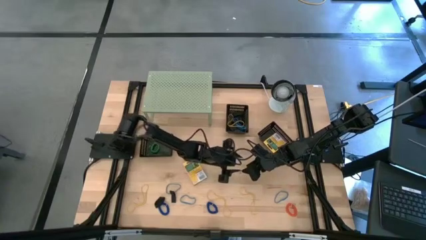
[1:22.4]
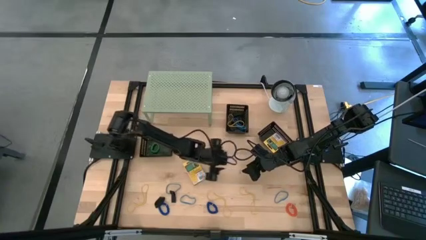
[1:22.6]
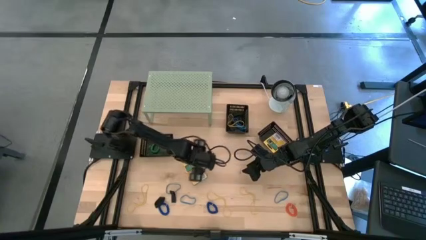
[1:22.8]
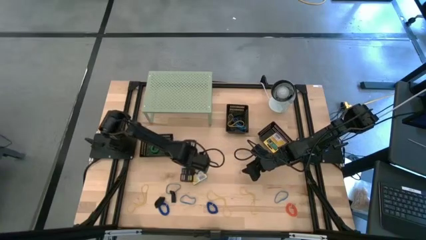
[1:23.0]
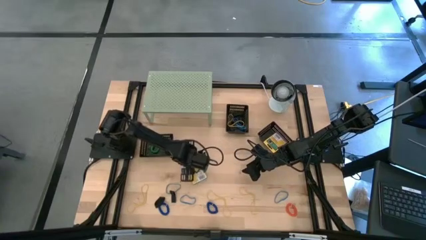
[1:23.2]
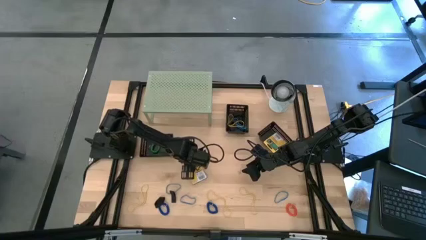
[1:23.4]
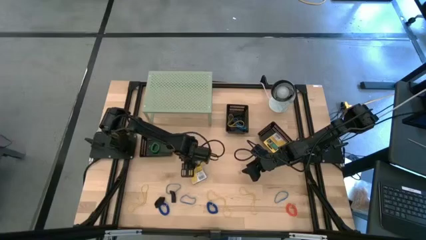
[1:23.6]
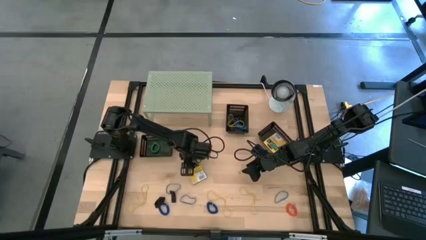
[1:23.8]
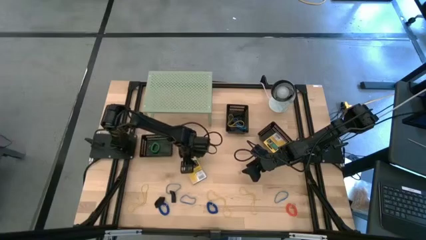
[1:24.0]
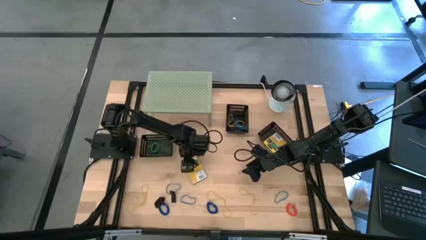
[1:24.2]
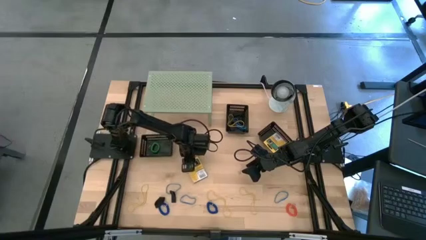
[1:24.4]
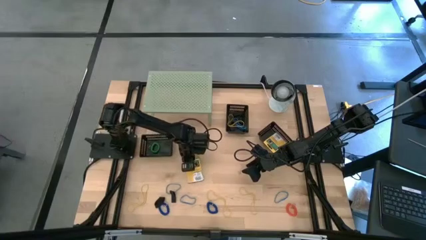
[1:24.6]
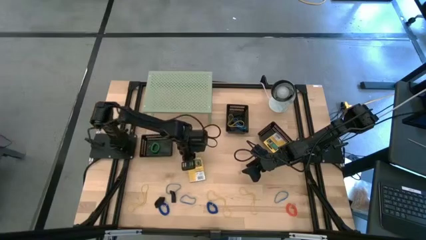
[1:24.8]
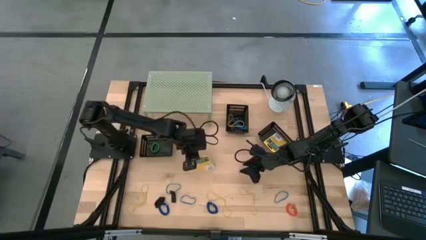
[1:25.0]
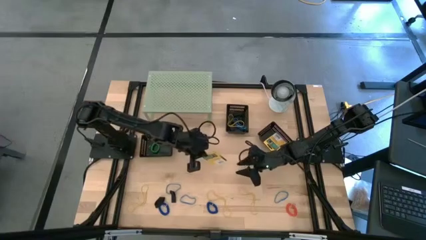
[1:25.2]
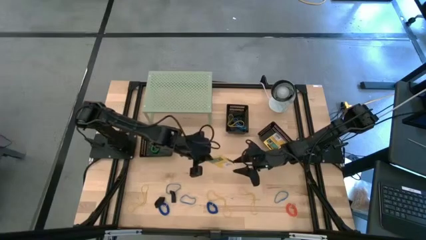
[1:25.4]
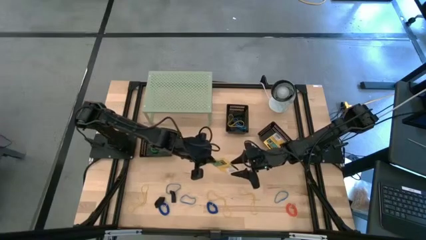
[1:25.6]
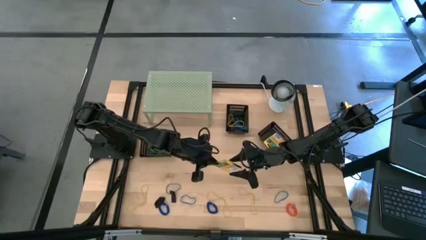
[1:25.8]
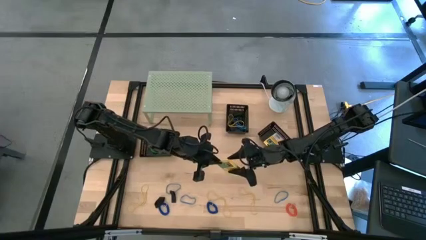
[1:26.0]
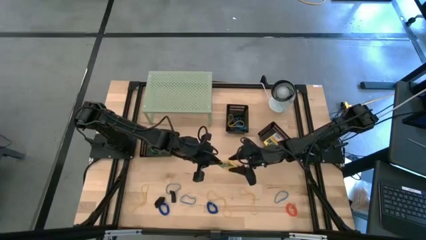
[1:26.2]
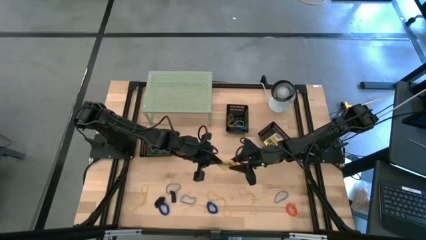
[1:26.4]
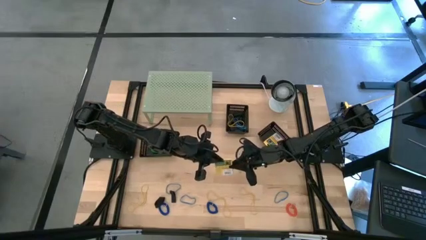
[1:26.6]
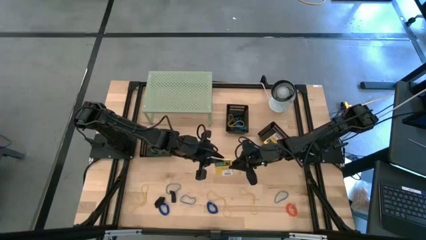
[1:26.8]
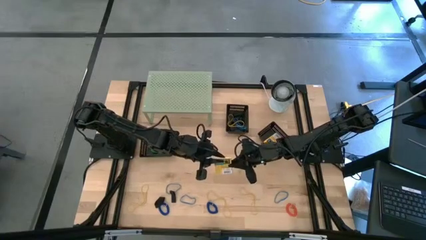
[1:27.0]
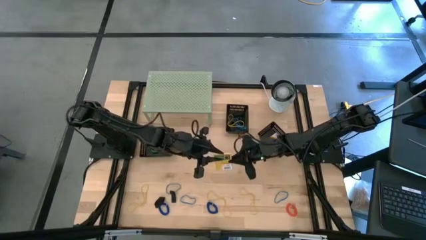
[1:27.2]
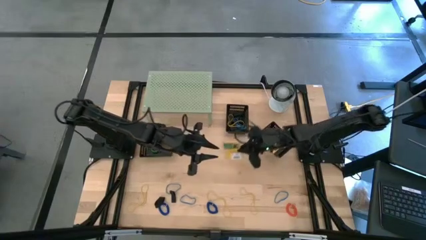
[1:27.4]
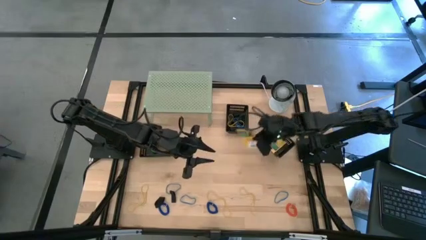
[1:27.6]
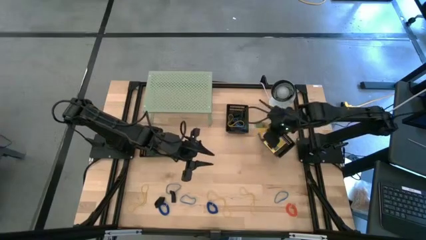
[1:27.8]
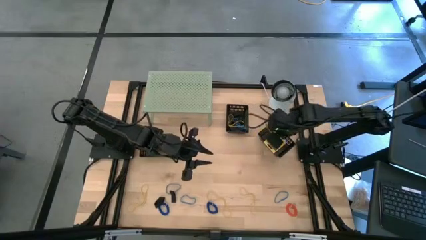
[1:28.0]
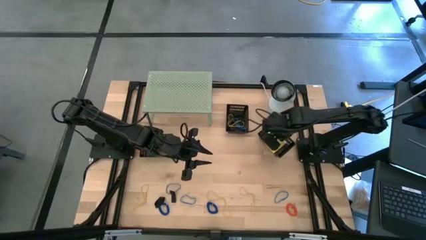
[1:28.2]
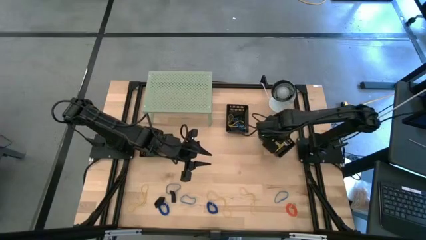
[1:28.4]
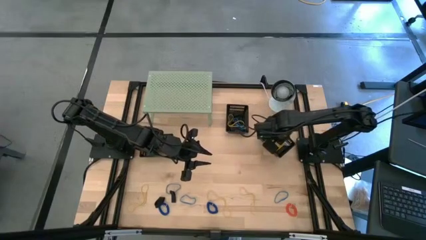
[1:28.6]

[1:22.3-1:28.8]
Task: Pick & Place Office Desk Supplies
Put the yellow crayon box into the right black bin

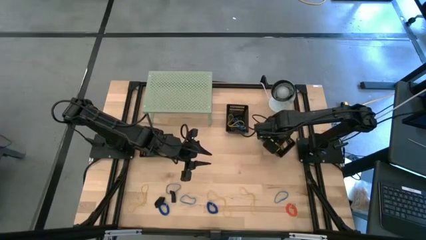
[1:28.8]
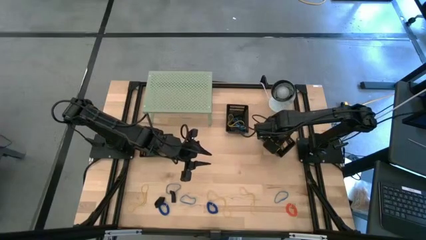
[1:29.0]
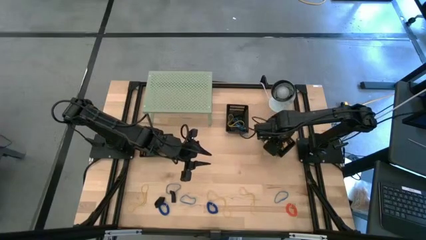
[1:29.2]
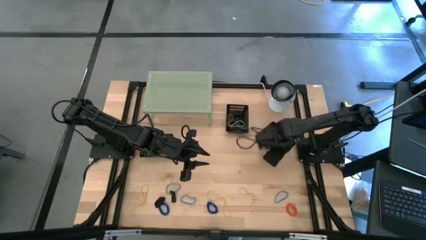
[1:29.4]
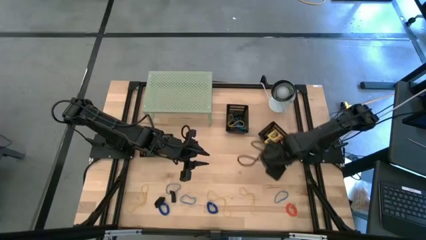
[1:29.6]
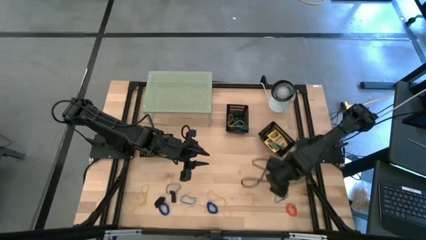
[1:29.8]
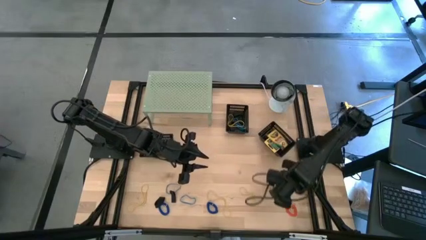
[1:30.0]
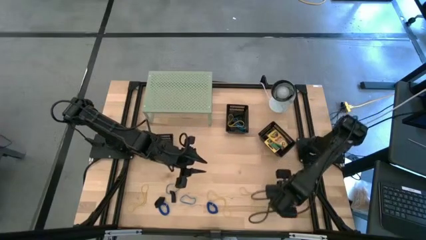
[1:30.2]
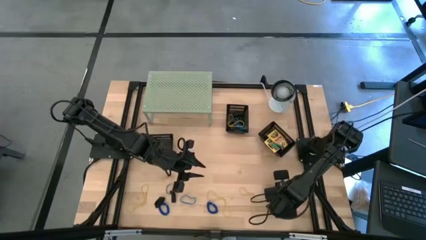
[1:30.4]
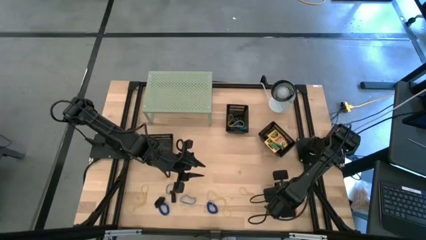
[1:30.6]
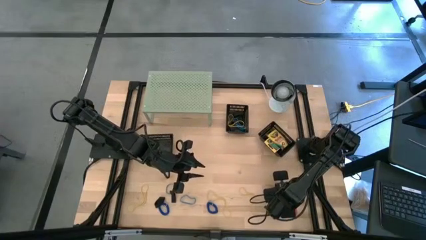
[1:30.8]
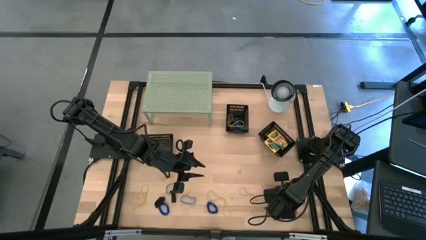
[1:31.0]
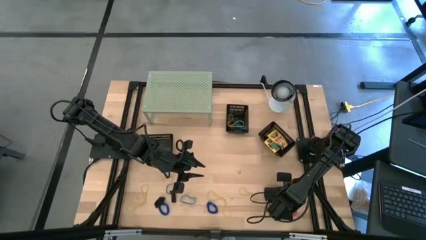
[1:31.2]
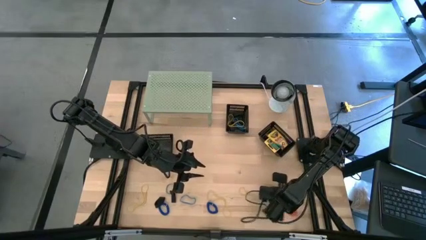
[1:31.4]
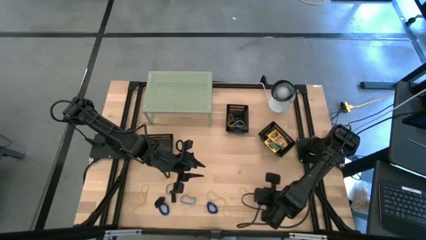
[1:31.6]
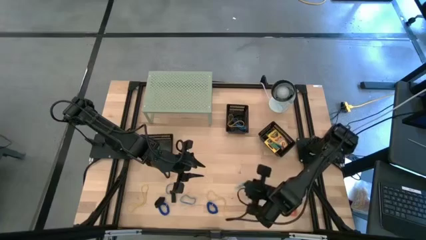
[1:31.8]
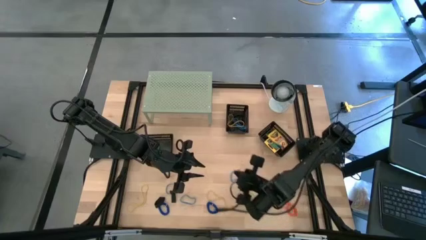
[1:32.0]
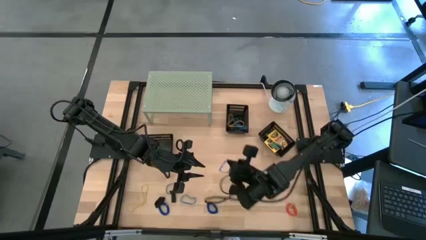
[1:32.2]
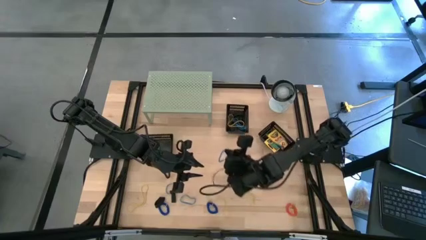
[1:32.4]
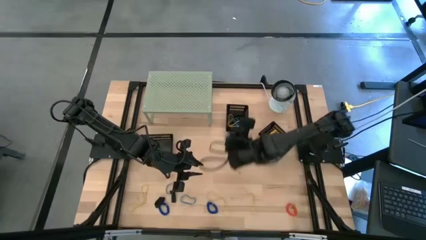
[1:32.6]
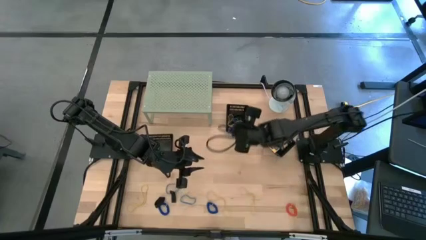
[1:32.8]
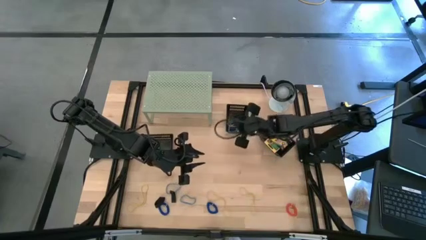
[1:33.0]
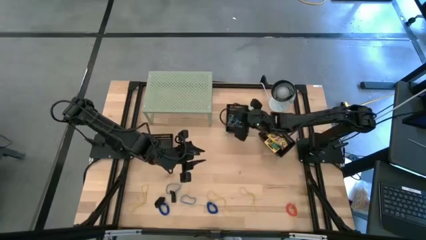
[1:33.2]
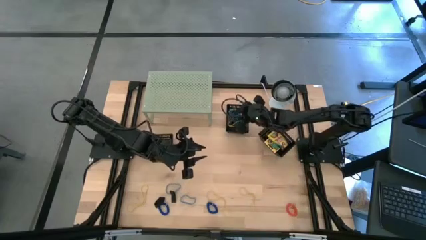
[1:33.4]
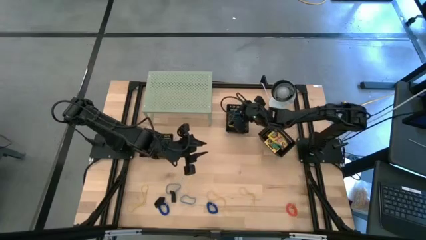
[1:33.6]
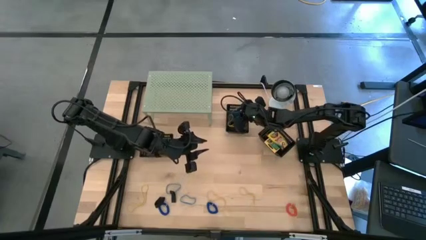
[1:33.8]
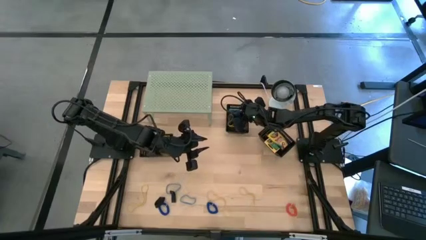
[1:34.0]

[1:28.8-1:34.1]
Put the blue rubber band into the top black bin

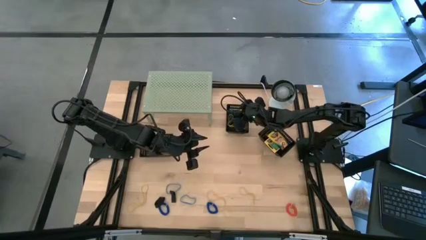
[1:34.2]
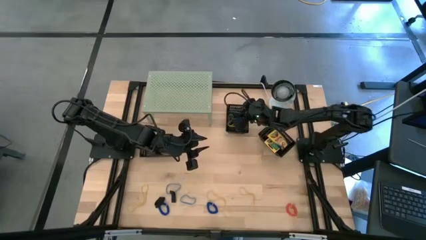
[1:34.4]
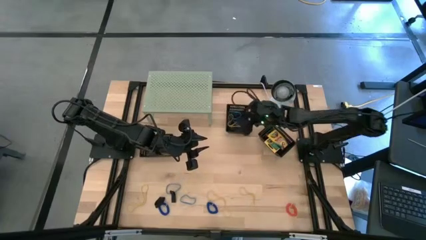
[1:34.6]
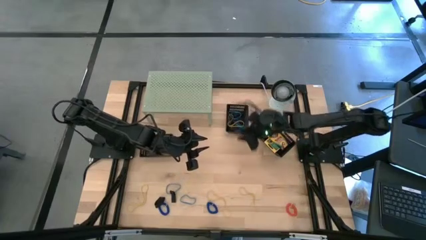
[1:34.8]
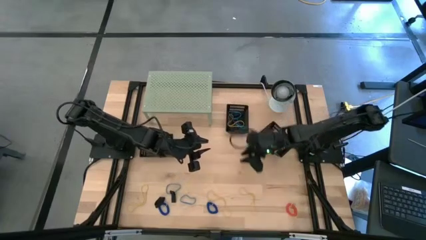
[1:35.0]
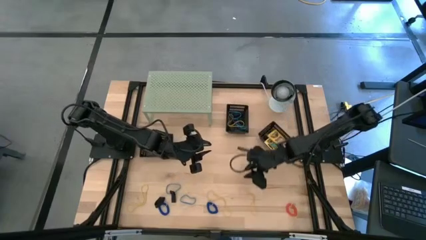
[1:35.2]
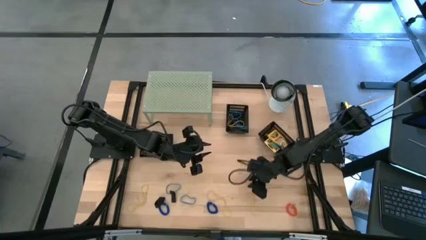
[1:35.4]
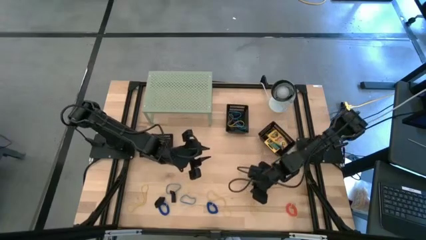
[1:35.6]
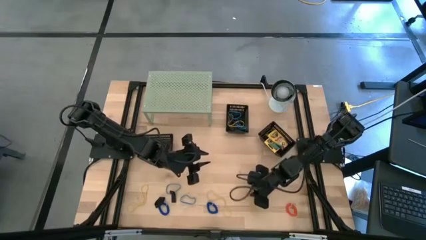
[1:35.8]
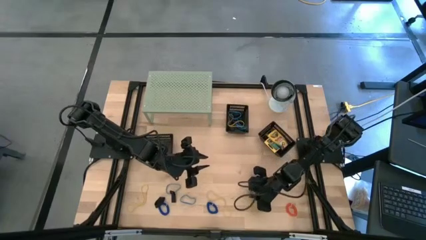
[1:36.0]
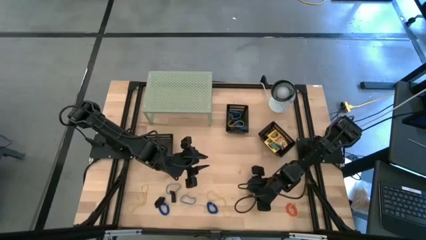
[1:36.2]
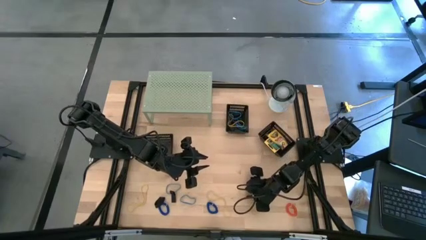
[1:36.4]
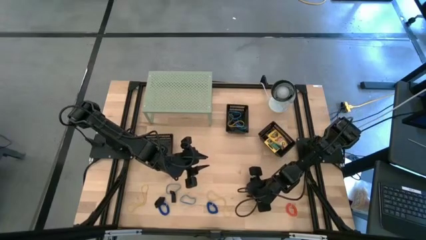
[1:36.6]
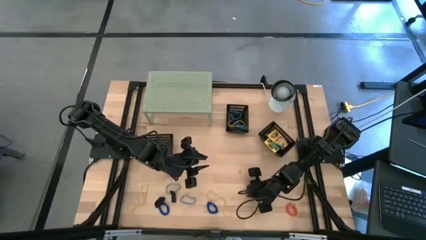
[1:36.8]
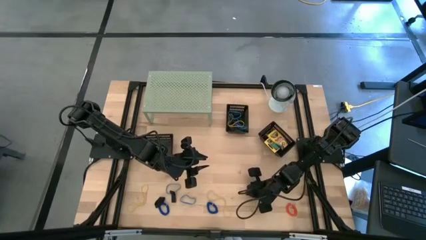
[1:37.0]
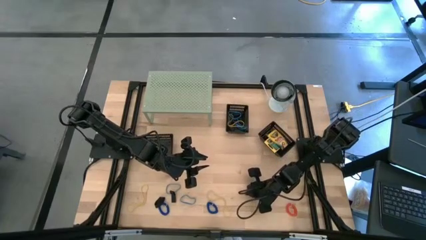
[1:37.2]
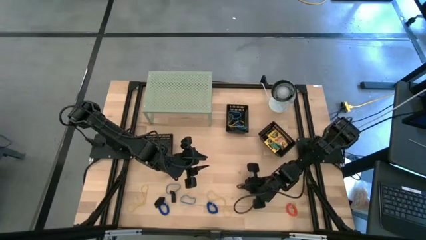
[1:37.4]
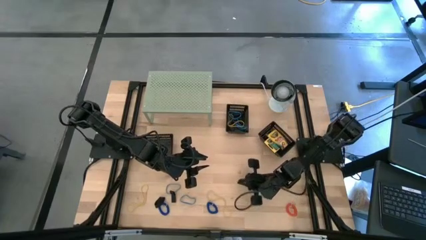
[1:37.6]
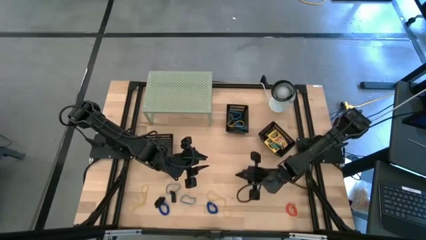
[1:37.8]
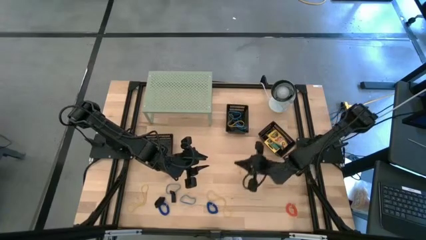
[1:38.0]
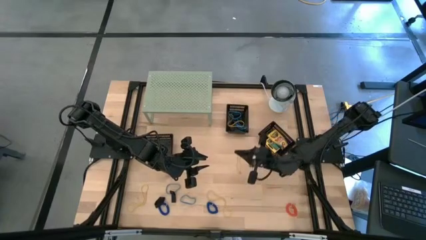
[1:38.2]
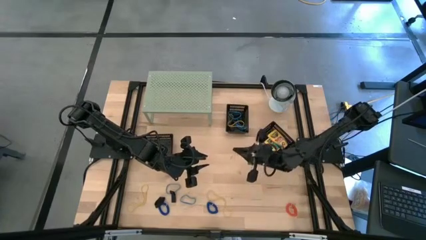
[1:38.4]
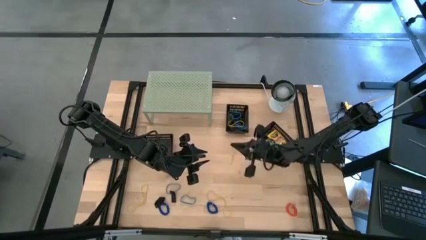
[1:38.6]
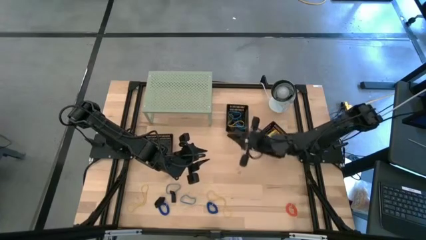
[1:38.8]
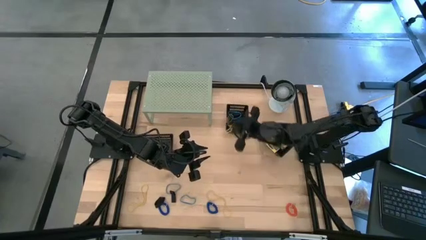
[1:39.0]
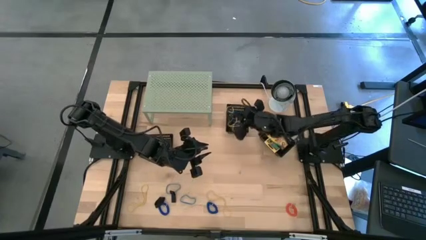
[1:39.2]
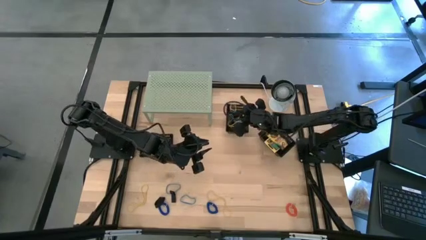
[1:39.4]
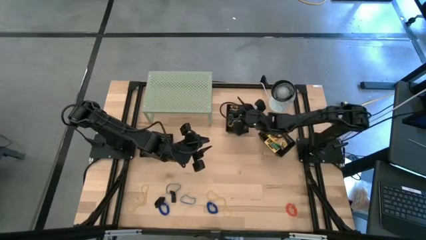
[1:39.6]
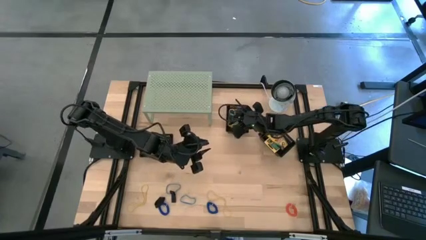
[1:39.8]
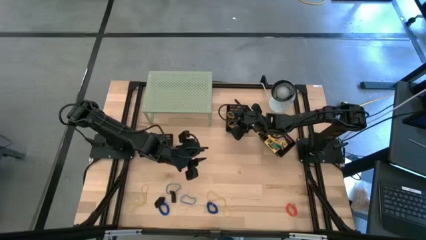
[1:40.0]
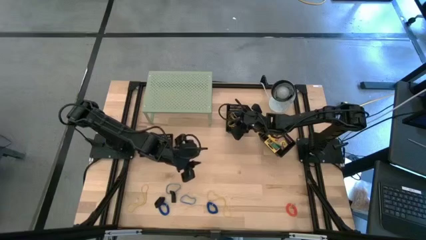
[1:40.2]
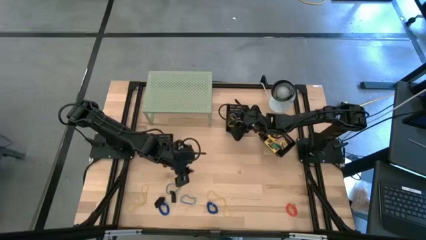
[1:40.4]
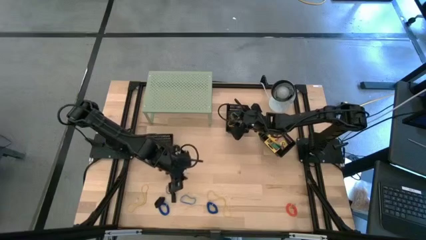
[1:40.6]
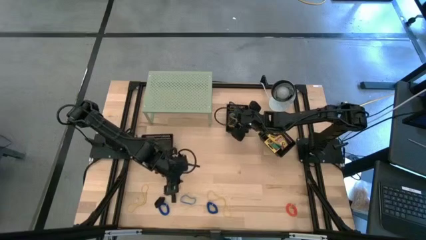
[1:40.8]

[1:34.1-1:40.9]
Put the yellow rubber band into the top black bin
